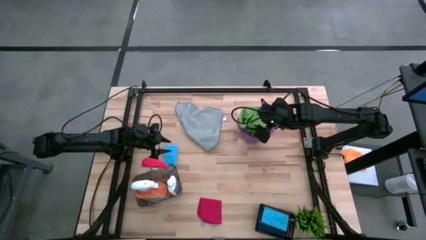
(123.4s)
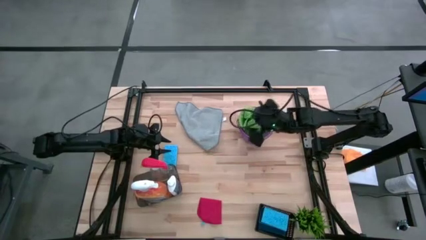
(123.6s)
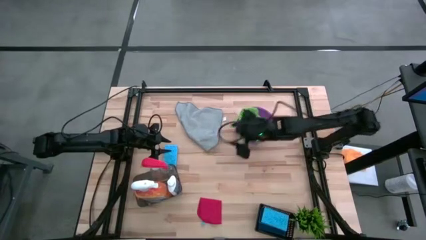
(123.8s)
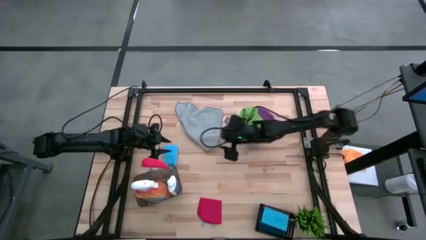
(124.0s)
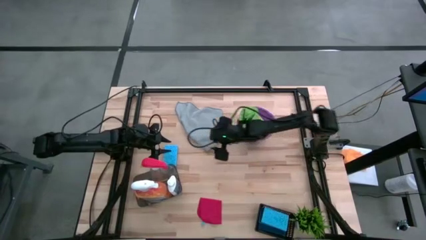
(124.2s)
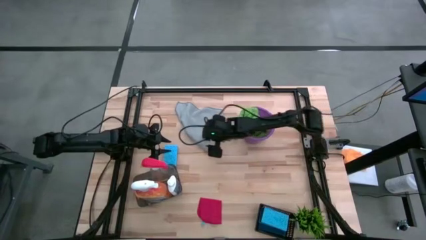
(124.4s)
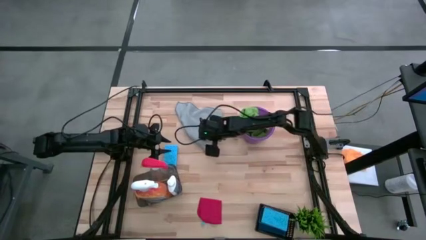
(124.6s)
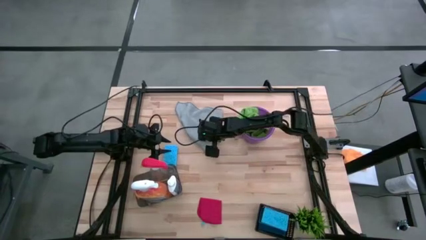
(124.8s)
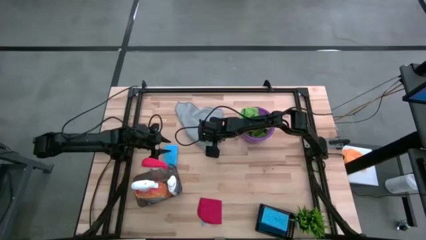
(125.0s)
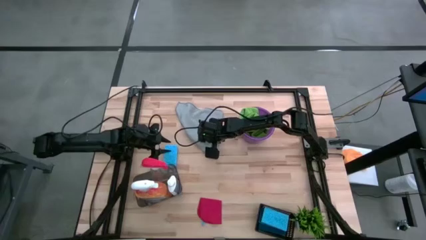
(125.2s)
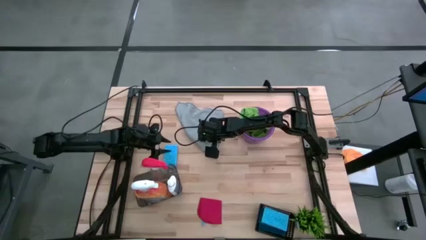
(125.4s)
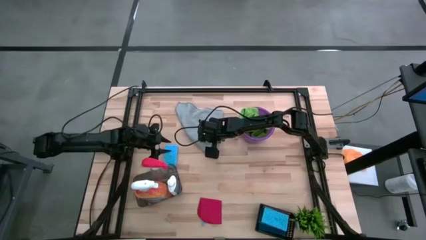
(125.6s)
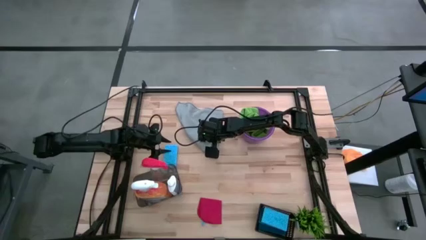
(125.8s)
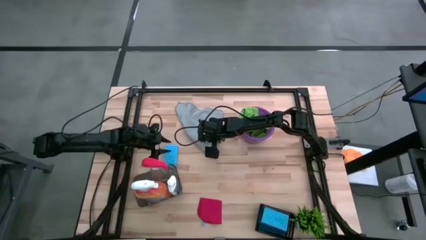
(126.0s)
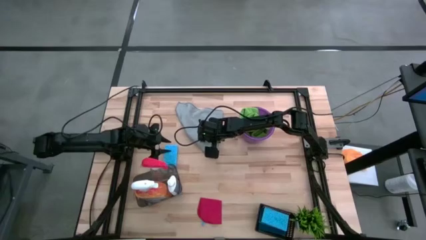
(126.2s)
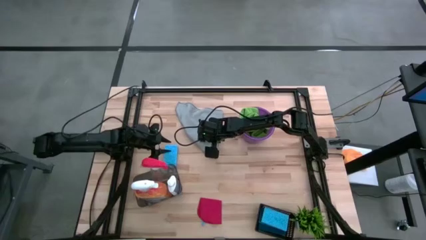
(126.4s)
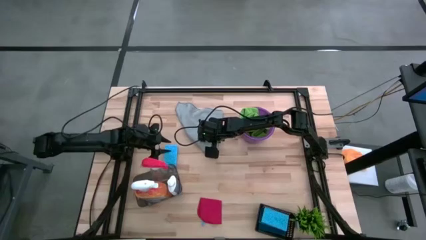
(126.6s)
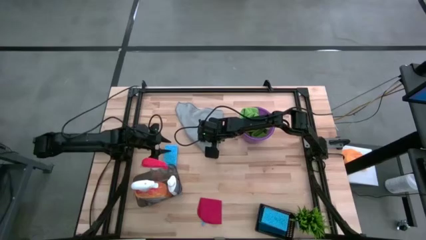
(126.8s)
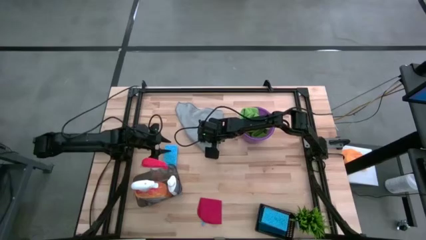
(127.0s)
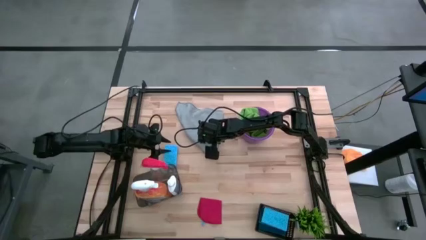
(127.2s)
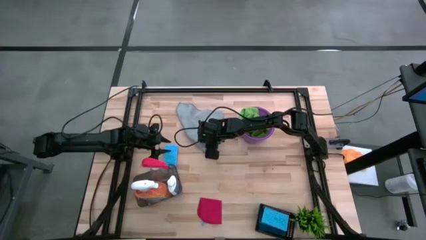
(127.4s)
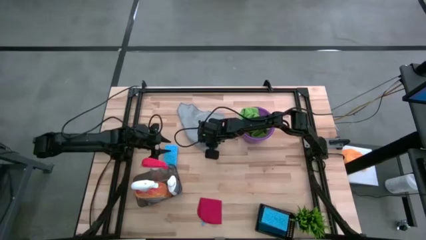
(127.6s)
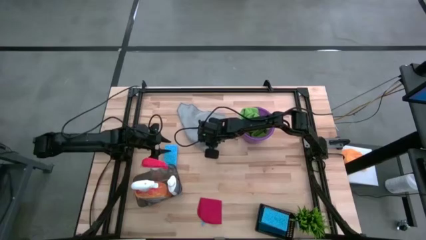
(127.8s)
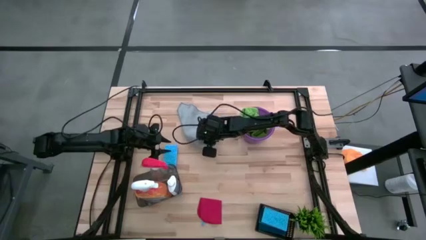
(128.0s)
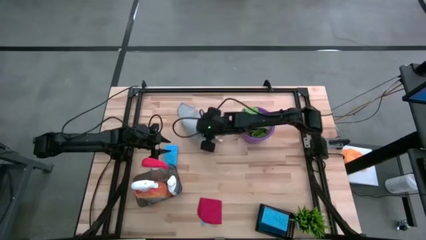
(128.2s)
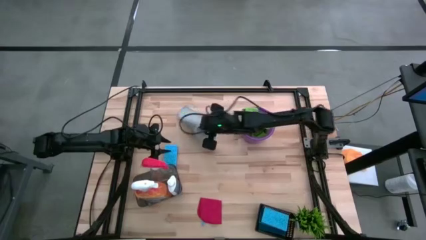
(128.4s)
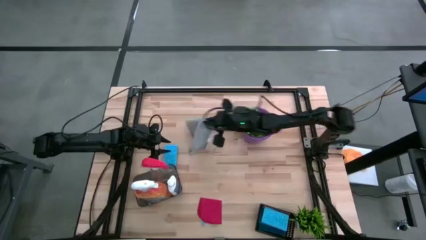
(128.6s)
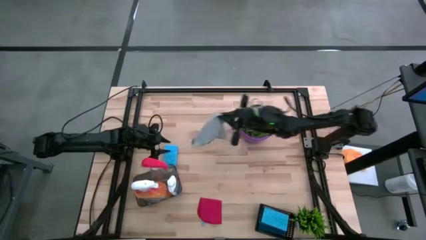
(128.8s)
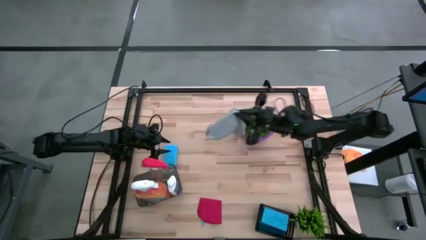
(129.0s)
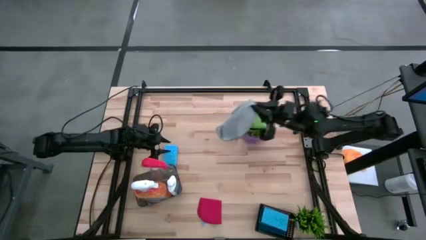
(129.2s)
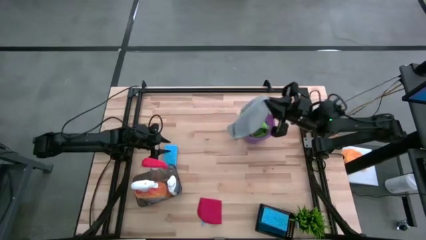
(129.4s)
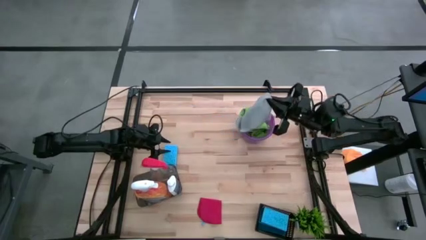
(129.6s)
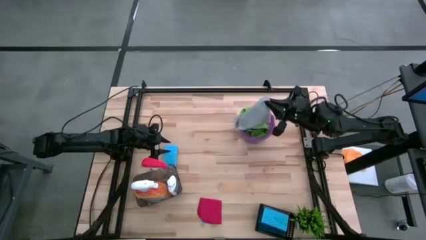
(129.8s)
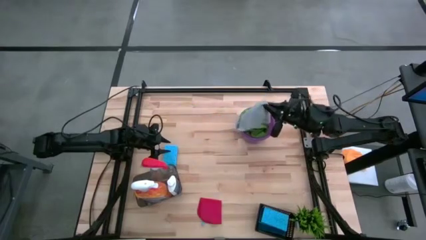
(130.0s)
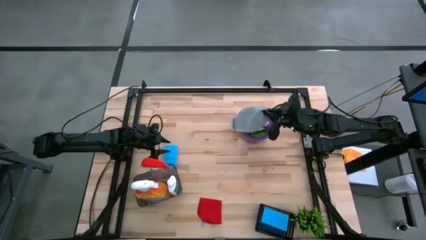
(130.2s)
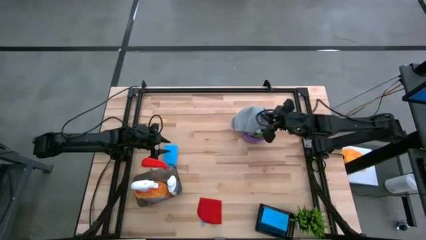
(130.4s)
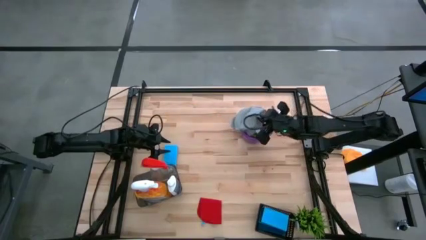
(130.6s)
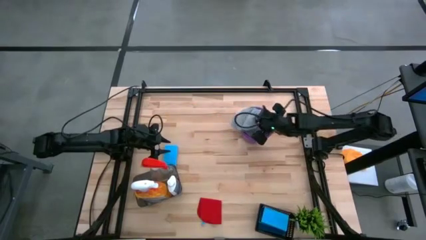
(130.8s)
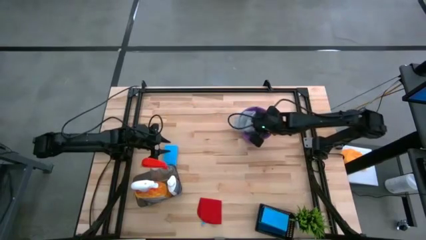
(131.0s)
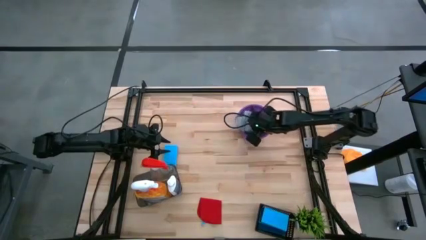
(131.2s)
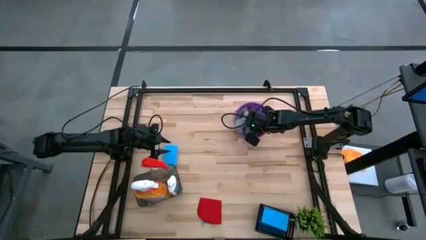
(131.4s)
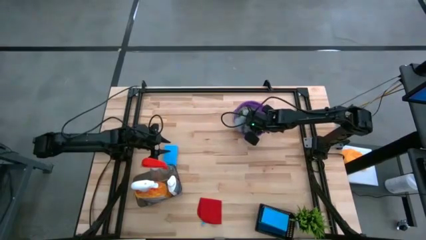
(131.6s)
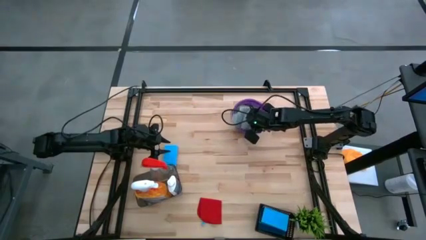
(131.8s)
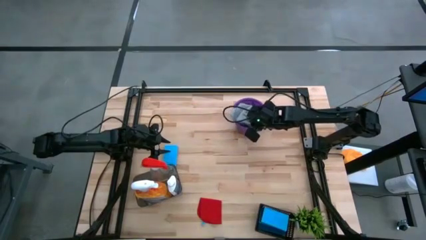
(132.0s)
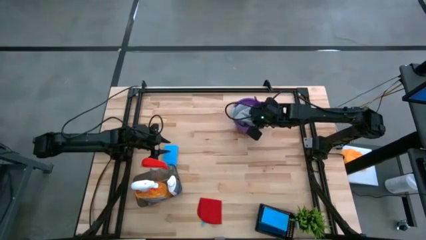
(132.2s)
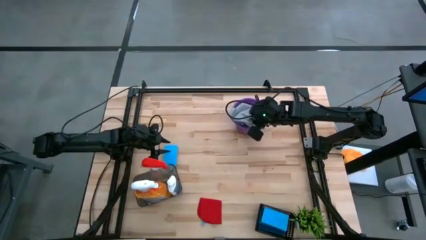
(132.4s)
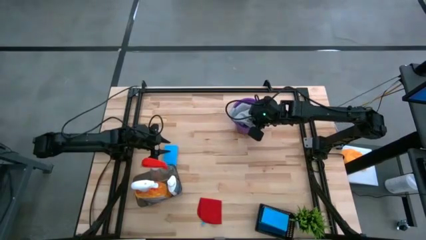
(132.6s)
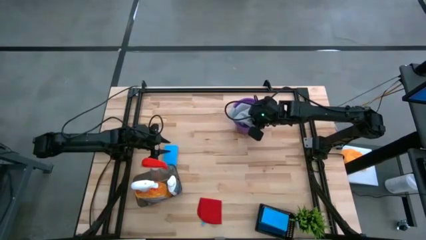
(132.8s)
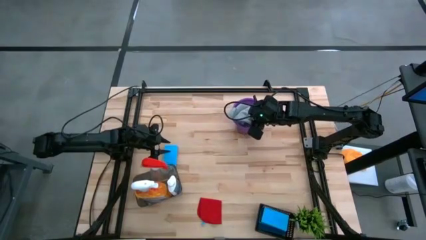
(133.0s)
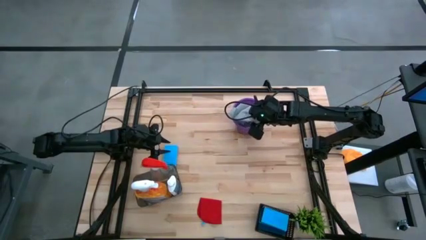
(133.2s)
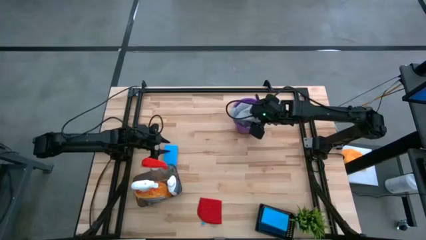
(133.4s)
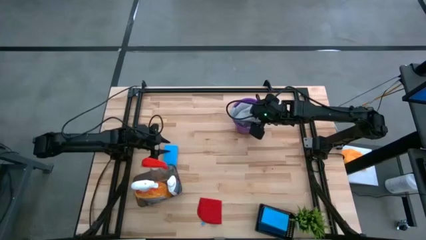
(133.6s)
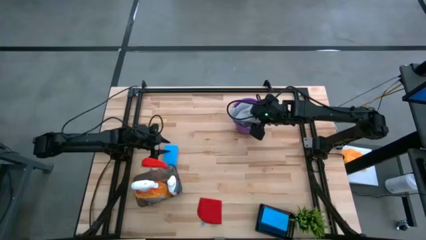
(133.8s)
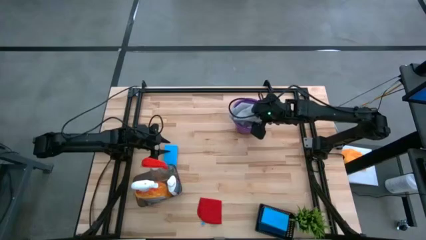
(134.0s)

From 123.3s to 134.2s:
Task: Pick & Place Kitchen Items
Put the gray microfiber towel into the purple bucket

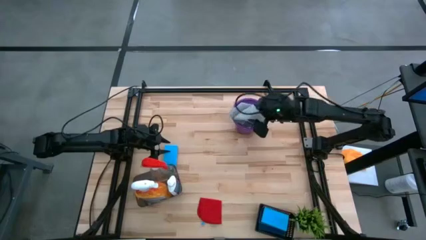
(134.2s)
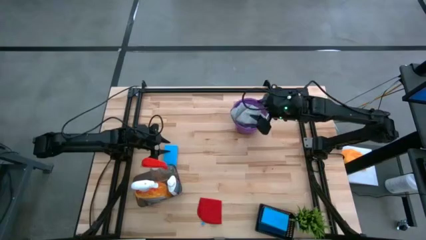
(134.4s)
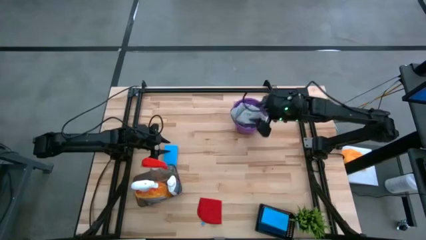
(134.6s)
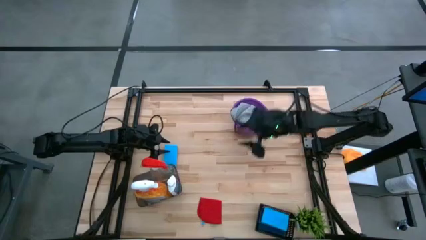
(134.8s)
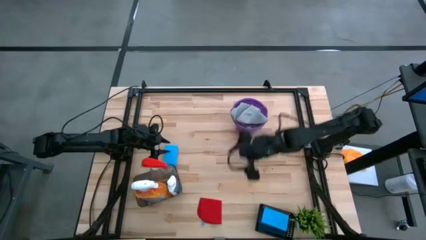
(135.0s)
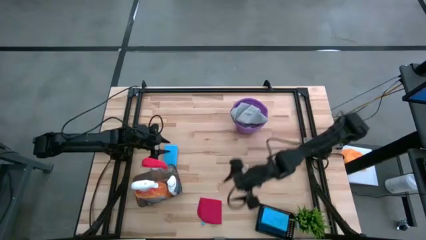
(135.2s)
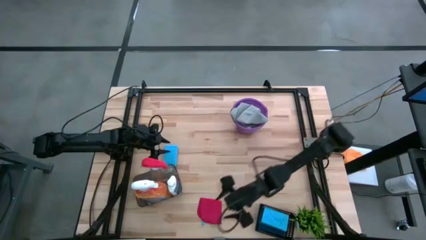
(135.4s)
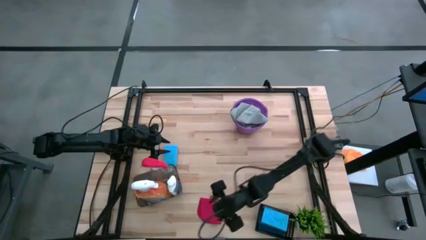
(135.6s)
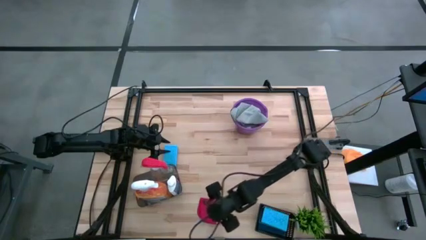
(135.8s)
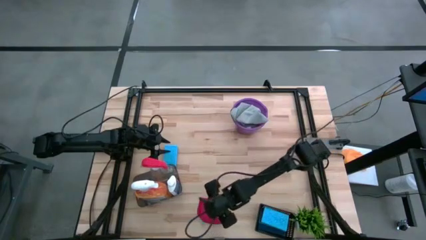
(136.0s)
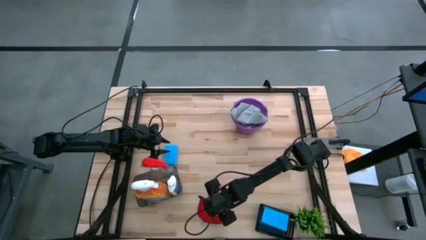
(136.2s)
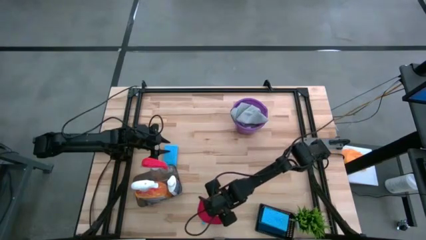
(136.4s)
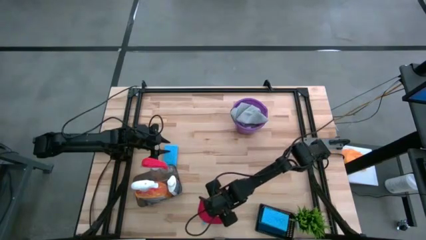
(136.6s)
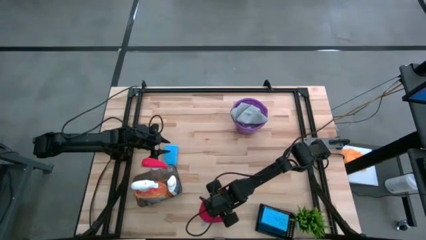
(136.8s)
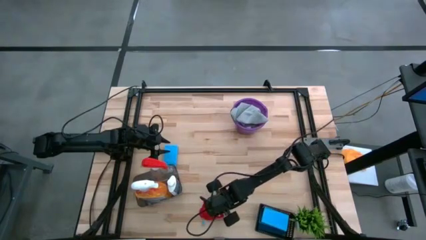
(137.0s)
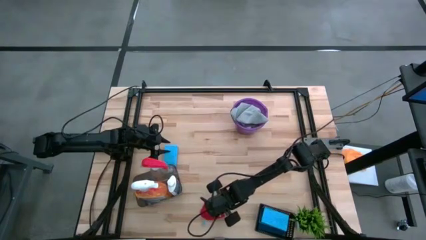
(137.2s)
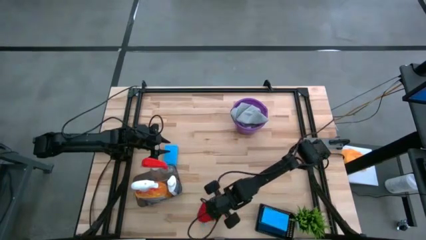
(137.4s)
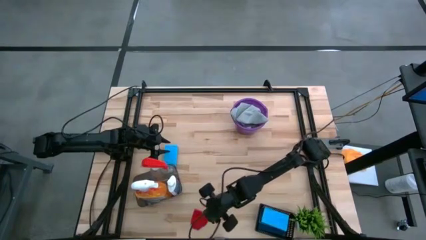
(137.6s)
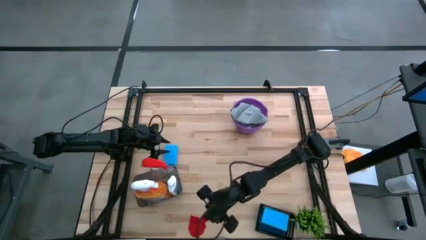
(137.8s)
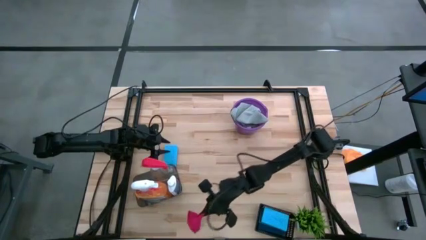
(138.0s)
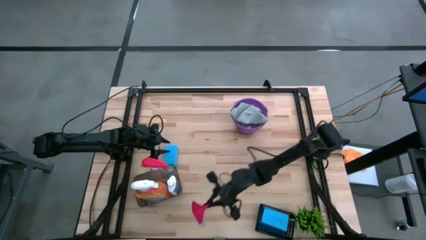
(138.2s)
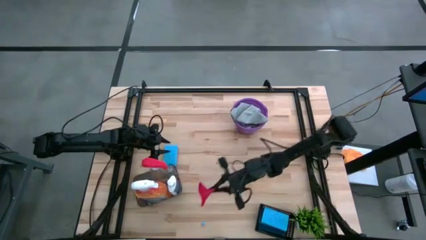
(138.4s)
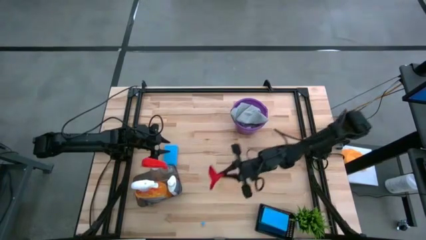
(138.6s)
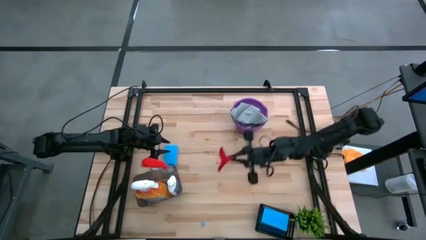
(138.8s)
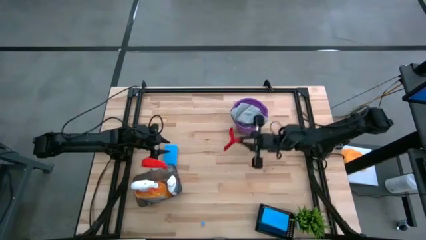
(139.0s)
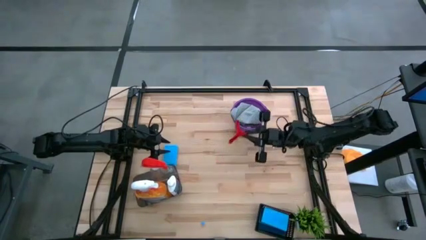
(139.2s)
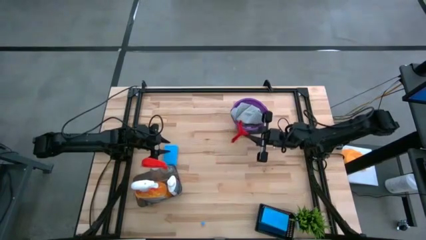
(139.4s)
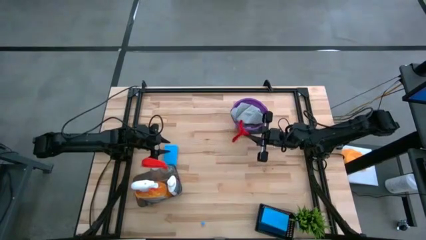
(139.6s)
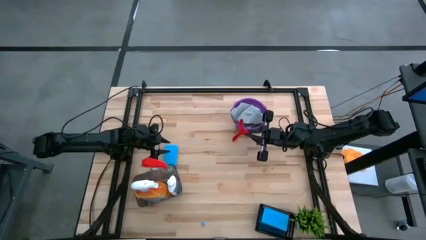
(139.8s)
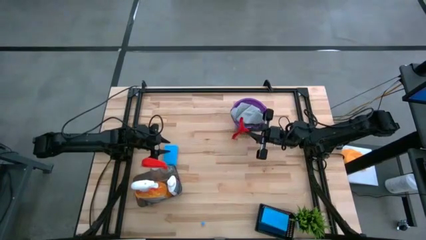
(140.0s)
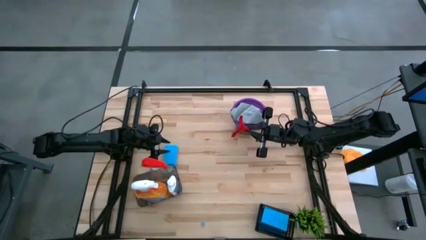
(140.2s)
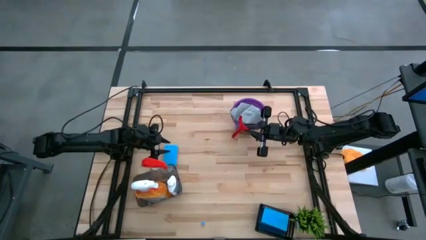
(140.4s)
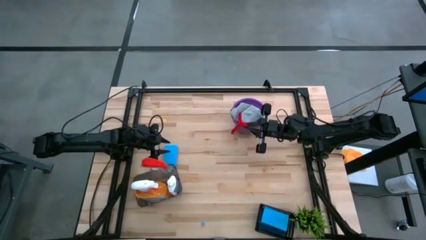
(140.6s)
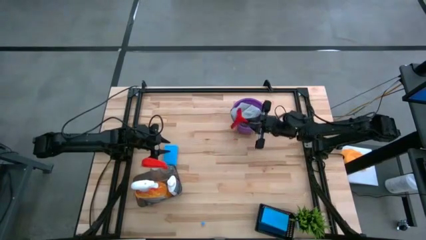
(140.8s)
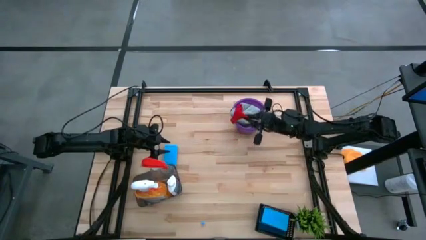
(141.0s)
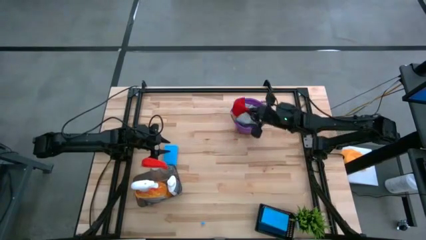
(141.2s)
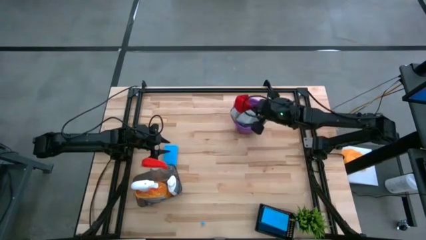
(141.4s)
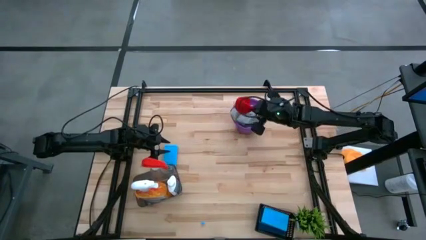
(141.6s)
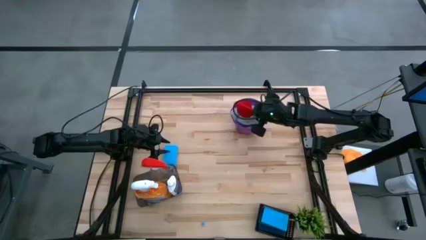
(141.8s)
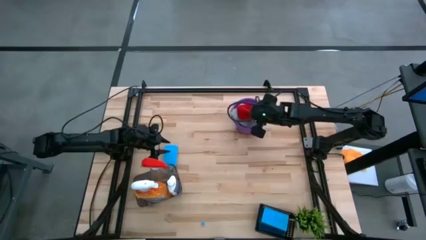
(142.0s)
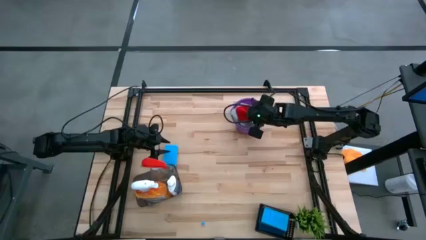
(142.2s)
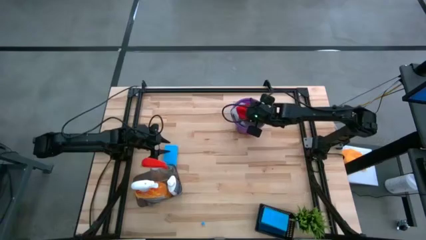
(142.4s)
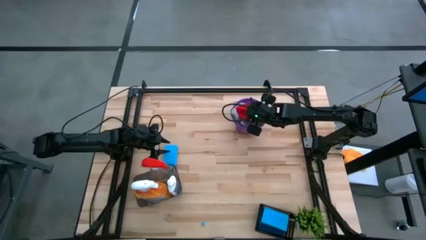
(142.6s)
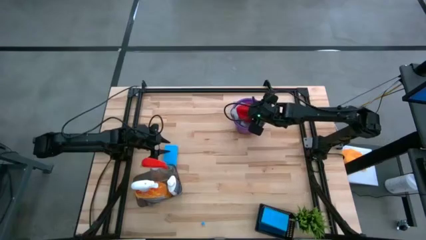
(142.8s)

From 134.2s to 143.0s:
Put the red microfiber towel into the purple bucket
